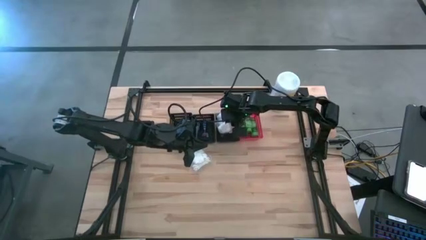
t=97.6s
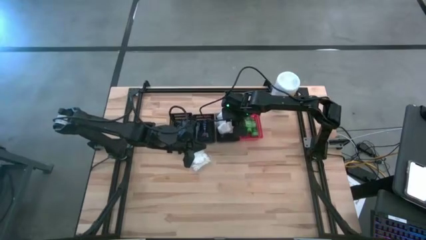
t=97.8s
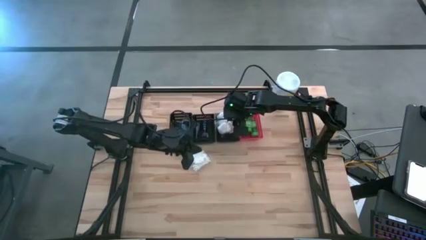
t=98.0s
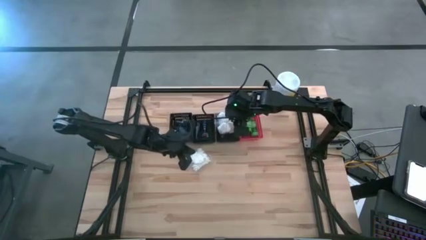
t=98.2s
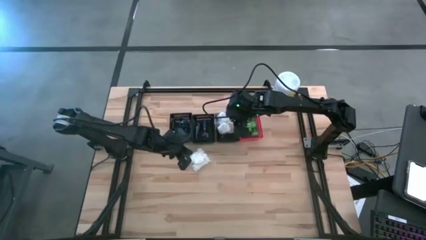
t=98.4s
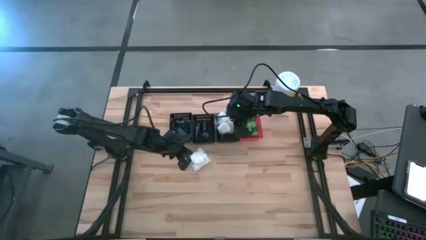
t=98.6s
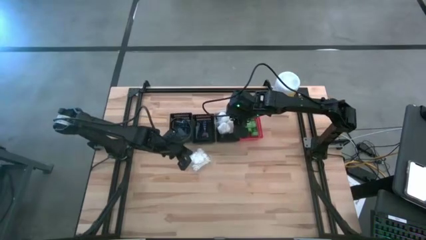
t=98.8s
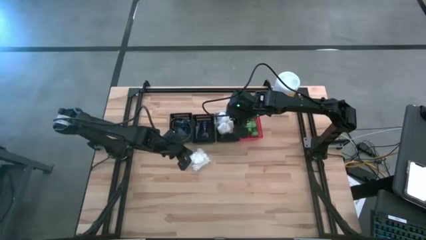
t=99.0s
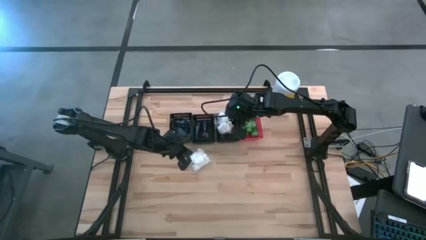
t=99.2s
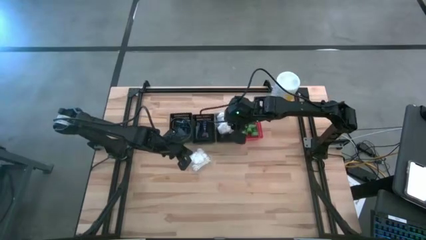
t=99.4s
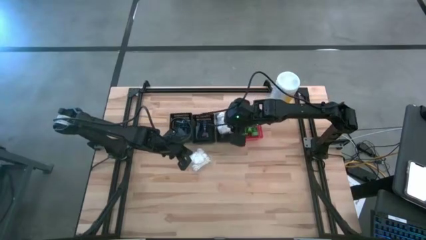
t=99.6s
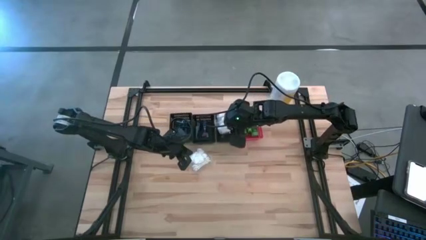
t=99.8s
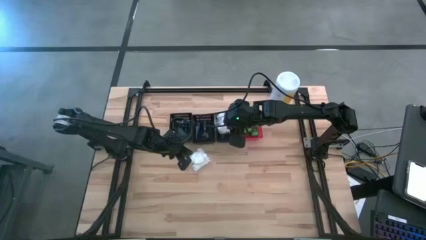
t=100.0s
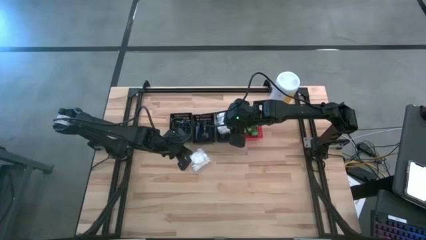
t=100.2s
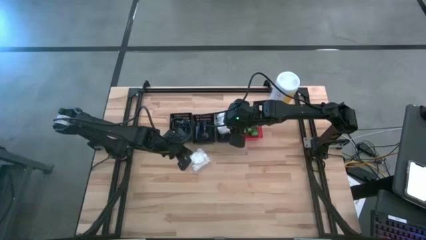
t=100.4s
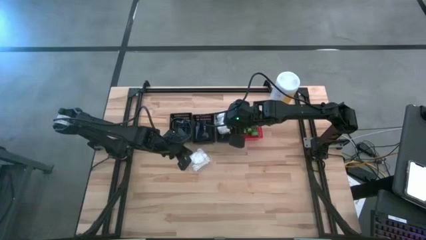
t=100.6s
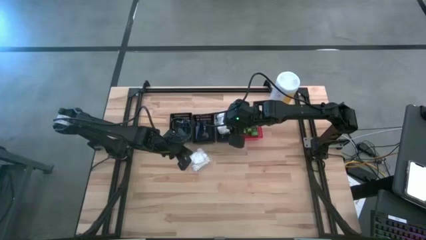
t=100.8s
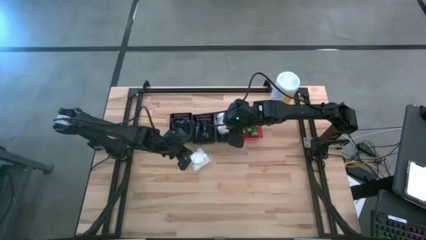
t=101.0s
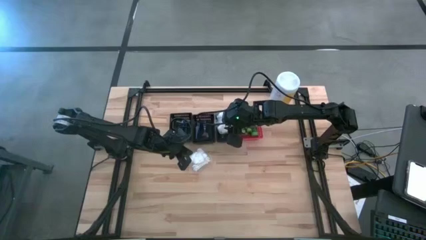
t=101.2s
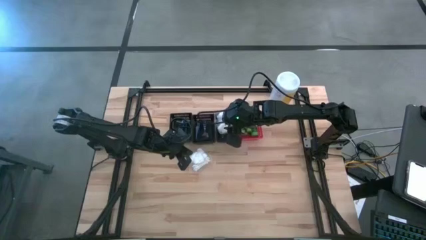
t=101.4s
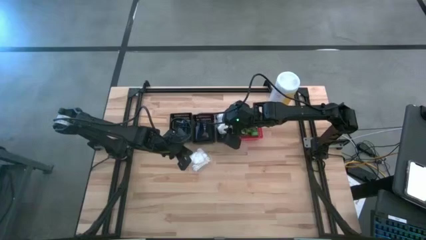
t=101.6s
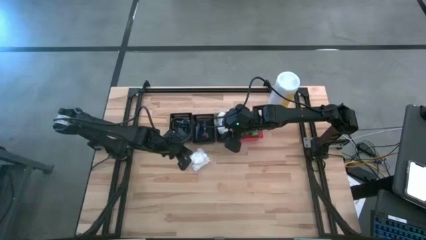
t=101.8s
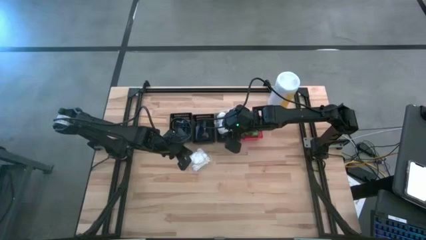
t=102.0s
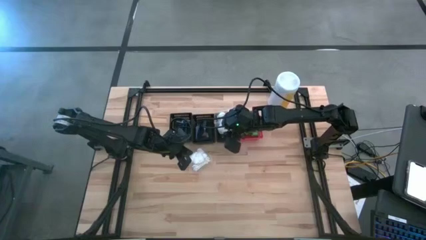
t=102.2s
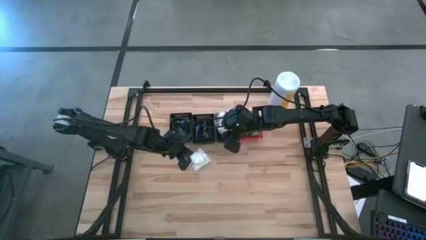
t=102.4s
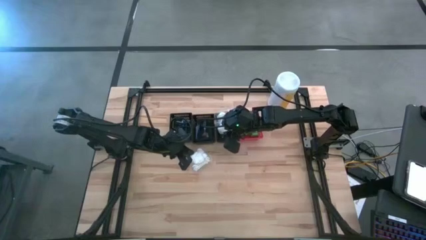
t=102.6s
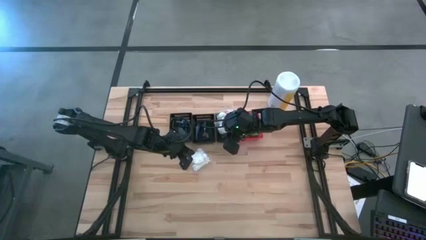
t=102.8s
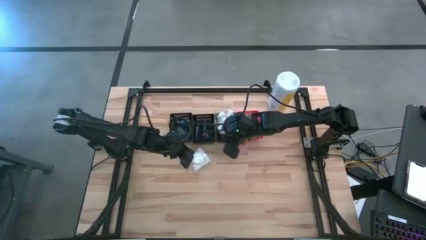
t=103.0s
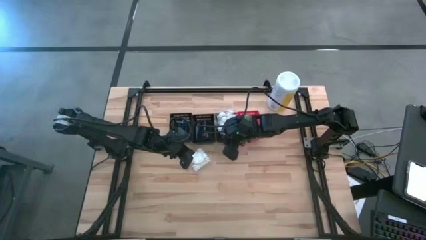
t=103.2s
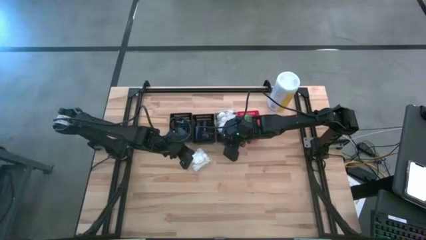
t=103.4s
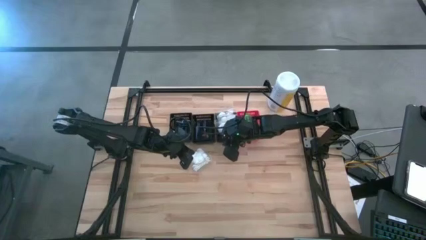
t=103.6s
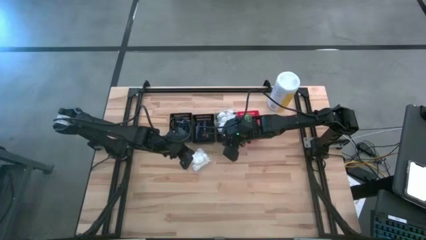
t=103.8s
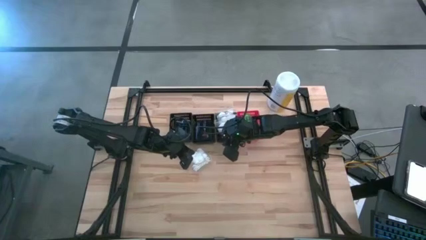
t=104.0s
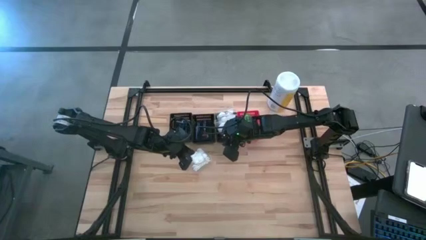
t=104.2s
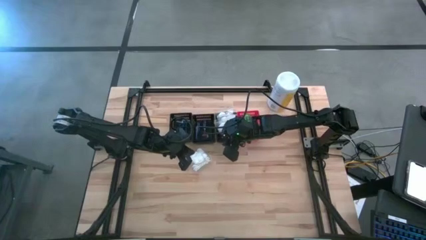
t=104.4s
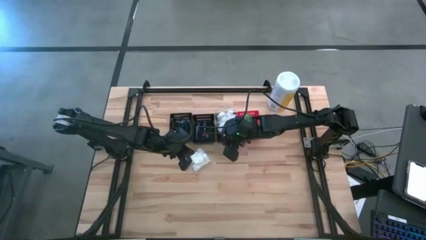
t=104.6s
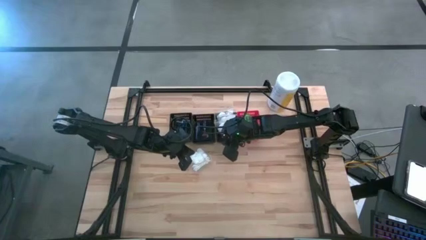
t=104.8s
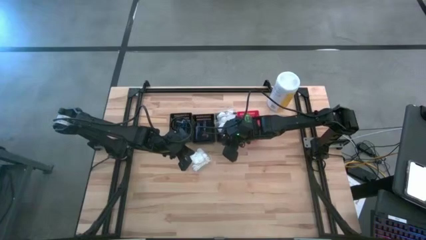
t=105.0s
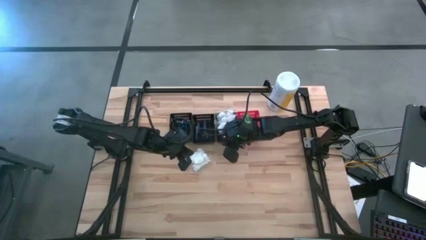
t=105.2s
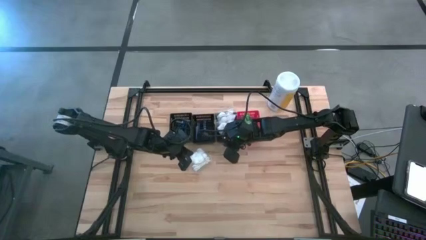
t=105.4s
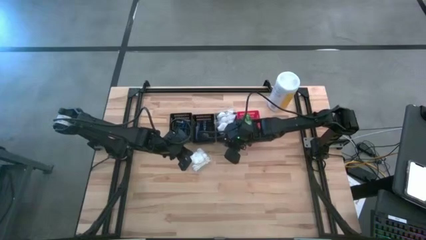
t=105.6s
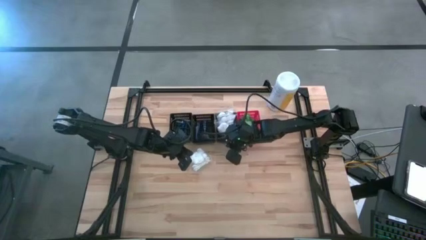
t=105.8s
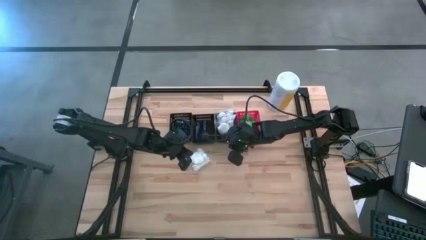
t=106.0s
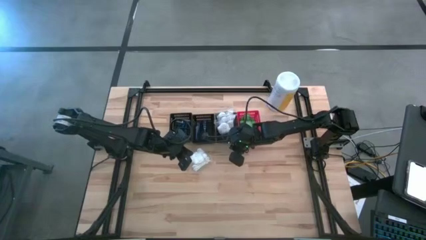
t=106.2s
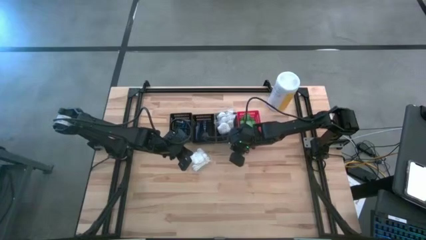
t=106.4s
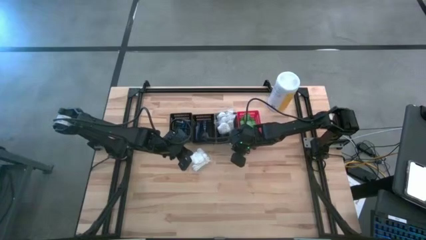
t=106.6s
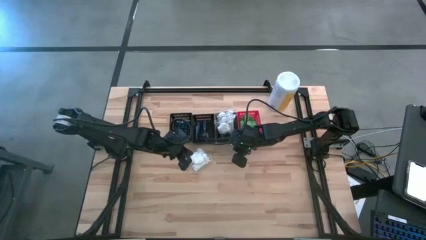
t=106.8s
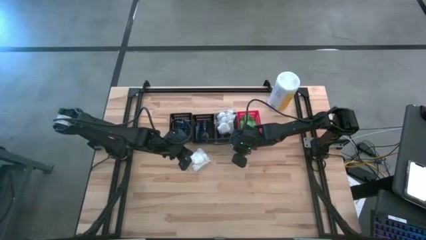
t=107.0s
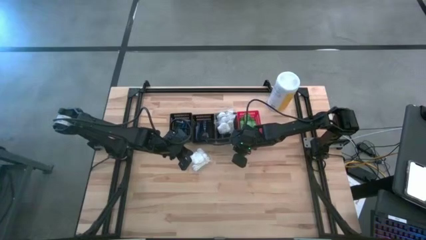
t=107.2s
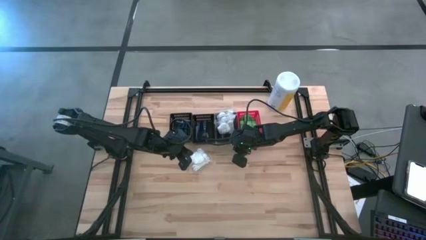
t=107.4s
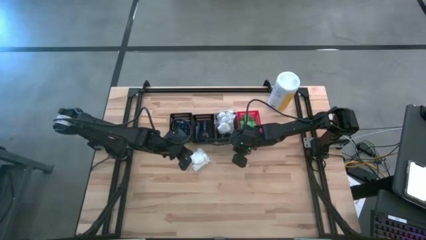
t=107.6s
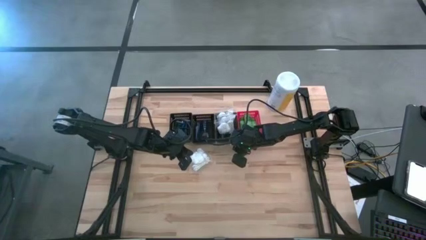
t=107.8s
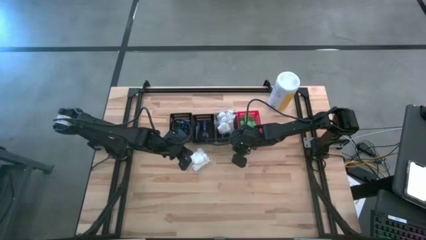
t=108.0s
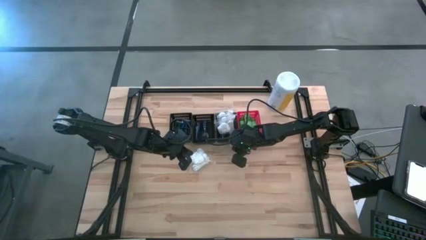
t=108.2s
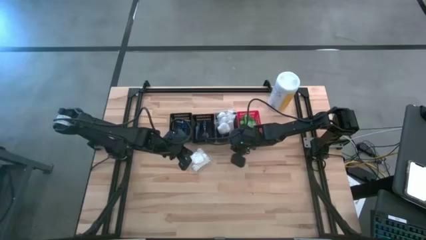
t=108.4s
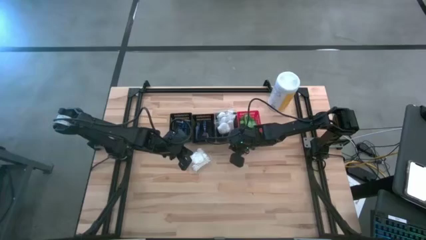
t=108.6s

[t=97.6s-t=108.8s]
Task: Pick & Place Travel size toiletries
Put the white cotton pack into the right black bin

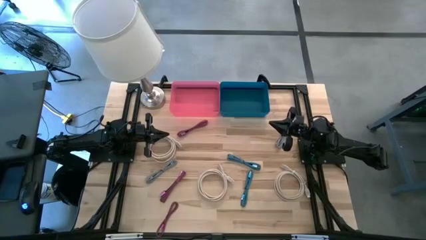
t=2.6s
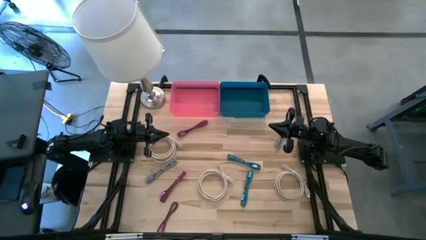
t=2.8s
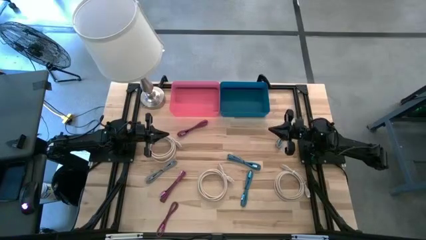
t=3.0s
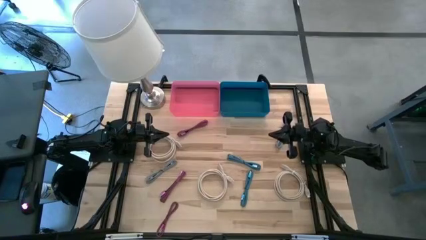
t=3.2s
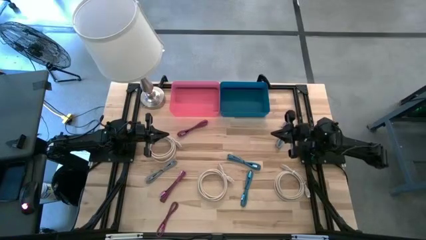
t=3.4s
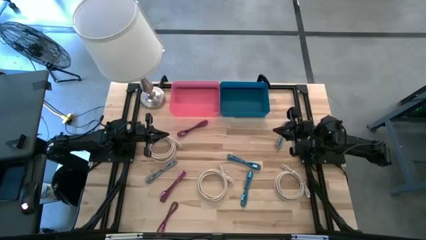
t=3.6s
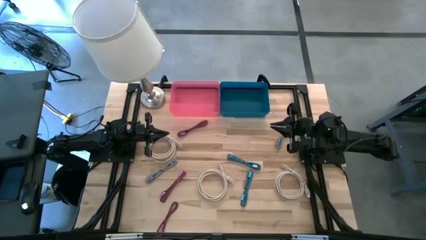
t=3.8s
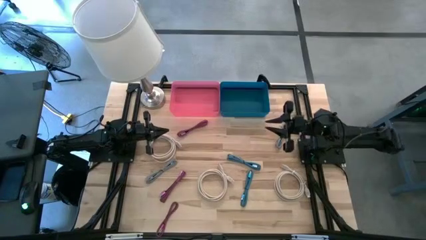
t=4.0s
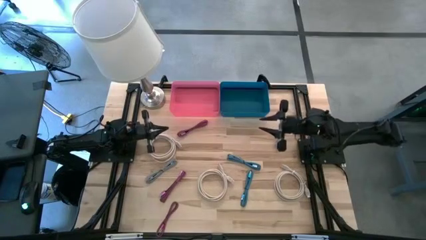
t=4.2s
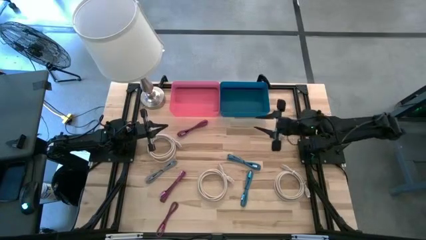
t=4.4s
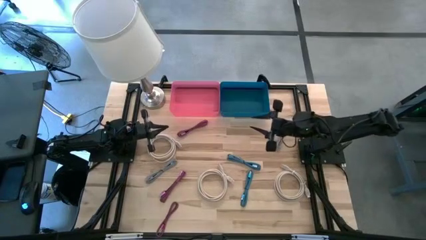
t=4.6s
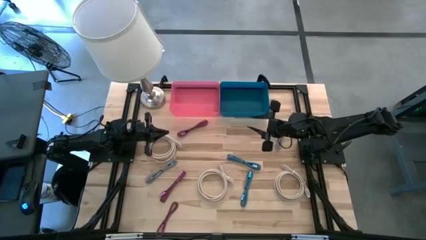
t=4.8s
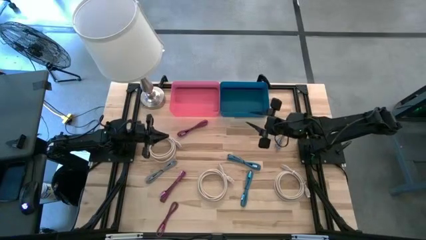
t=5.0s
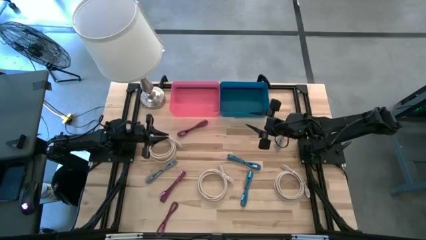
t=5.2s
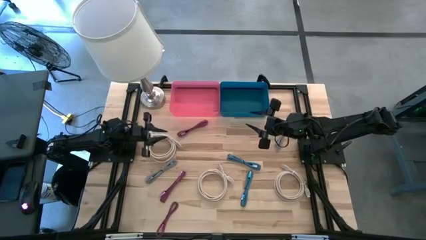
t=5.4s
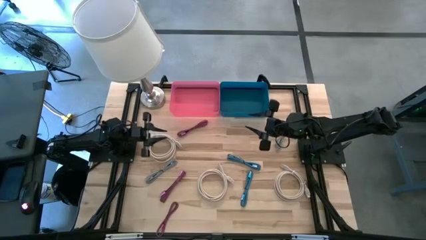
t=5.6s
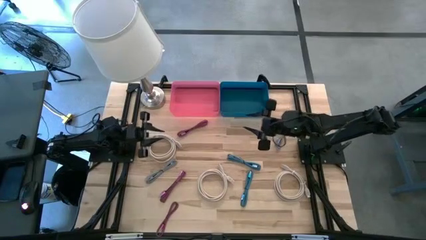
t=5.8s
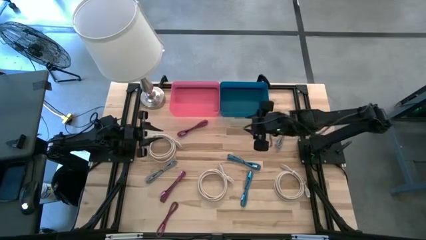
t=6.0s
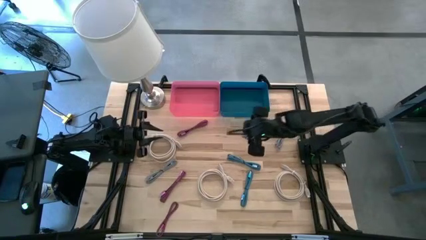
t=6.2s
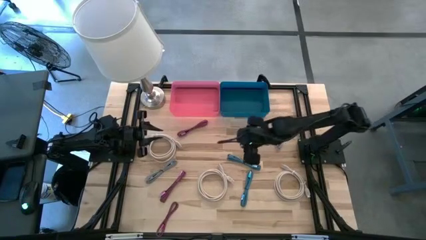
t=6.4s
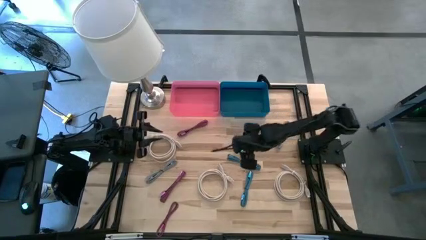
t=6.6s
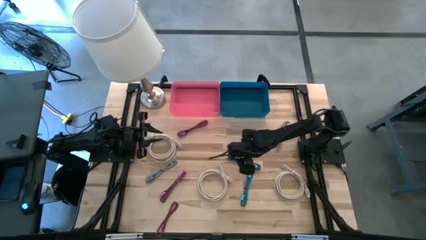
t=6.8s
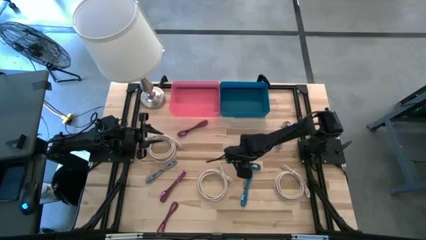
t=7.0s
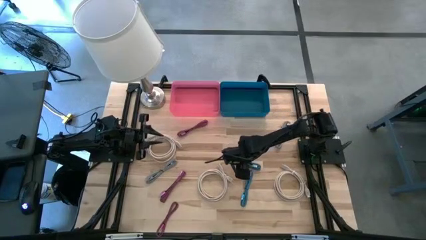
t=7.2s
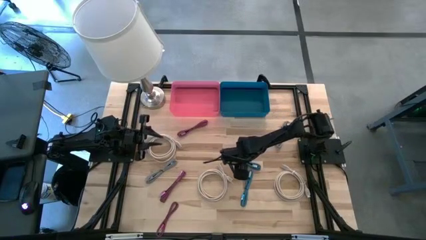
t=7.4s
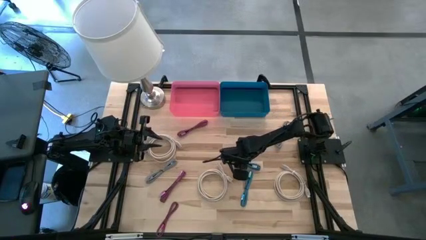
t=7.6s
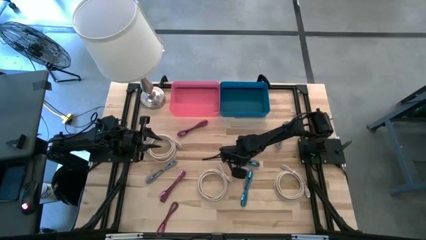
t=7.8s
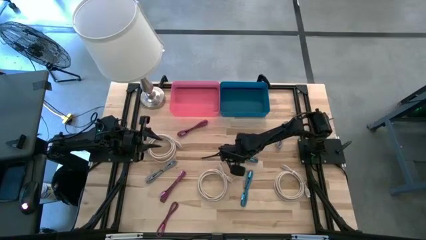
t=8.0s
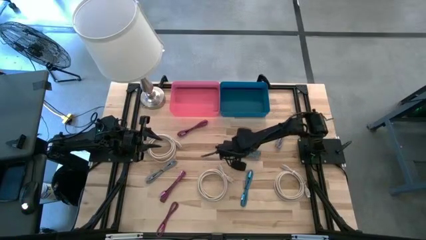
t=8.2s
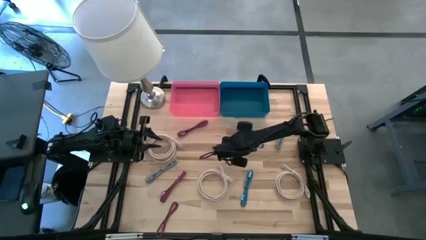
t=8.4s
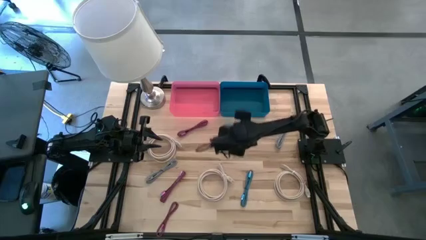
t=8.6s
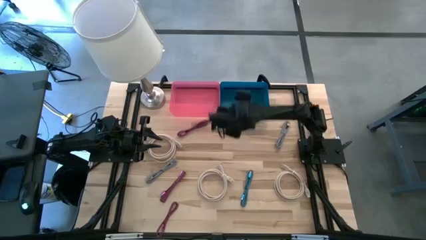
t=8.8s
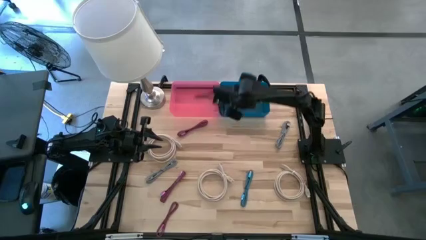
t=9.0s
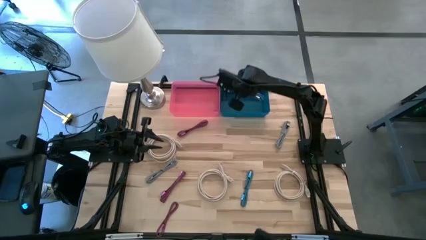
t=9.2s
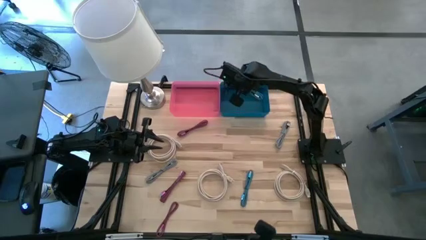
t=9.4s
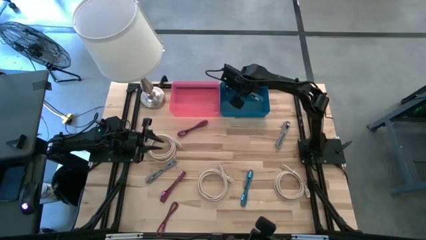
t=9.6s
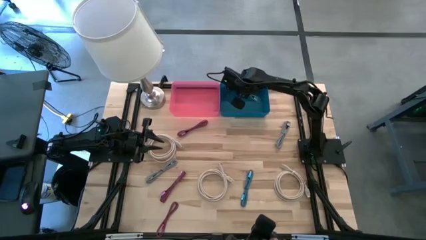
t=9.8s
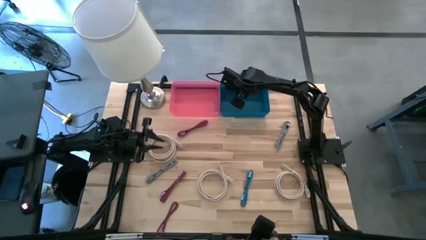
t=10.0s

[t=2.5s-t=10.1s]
Task: Pick & Place USB Port
Put the top small black and blue charger cable into the blue bin
